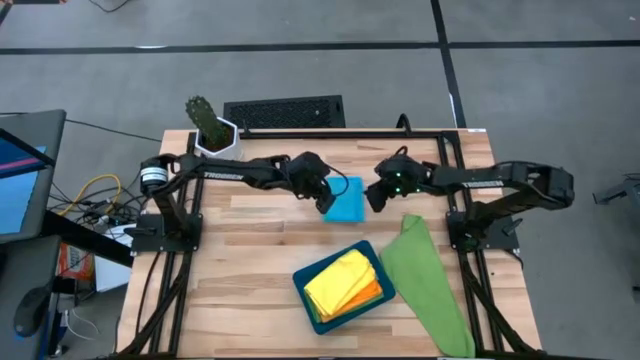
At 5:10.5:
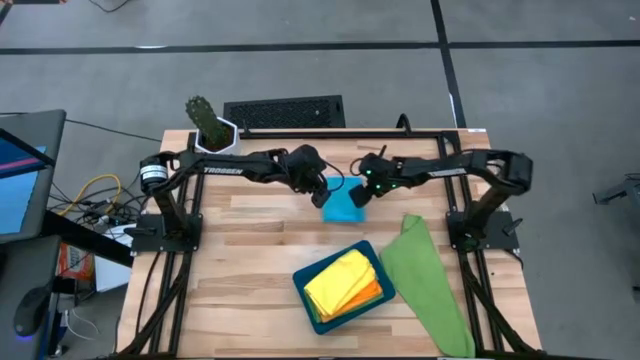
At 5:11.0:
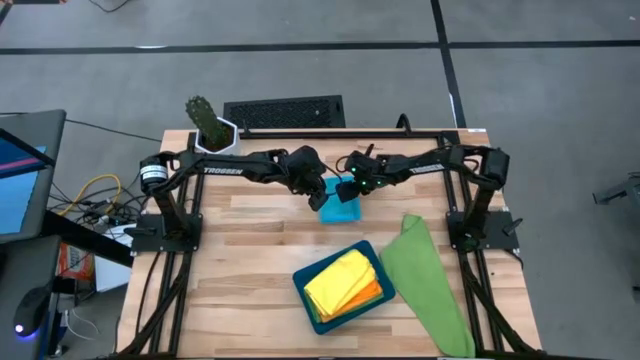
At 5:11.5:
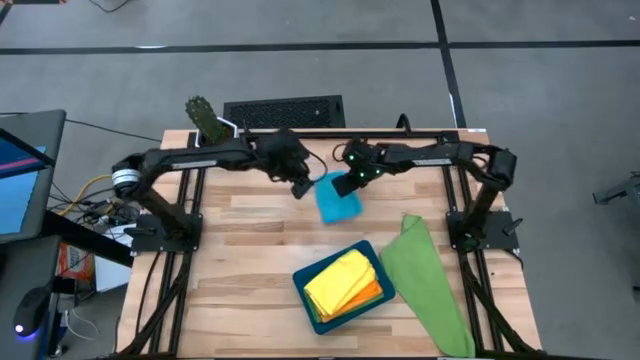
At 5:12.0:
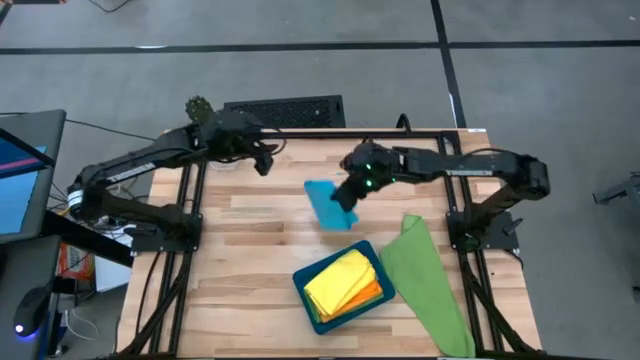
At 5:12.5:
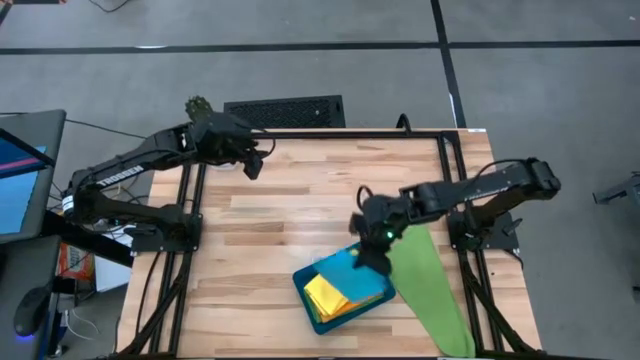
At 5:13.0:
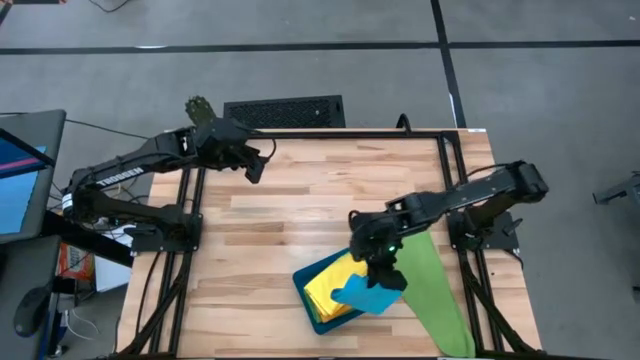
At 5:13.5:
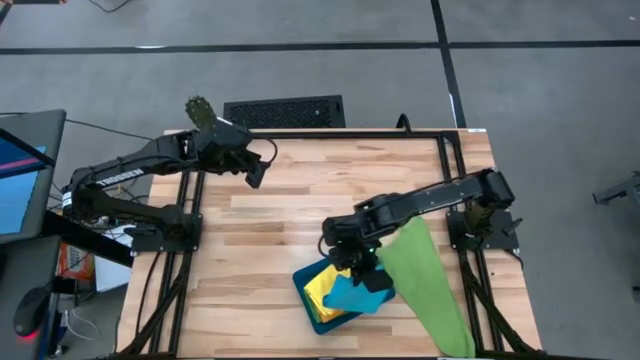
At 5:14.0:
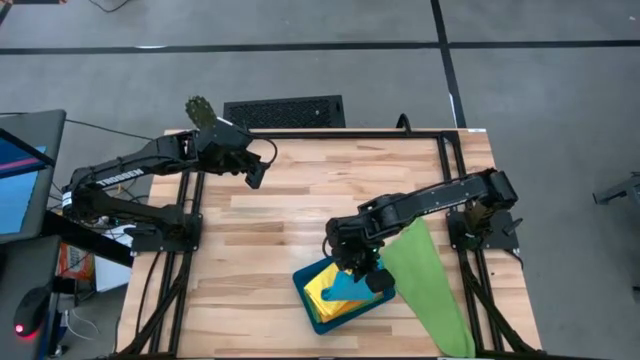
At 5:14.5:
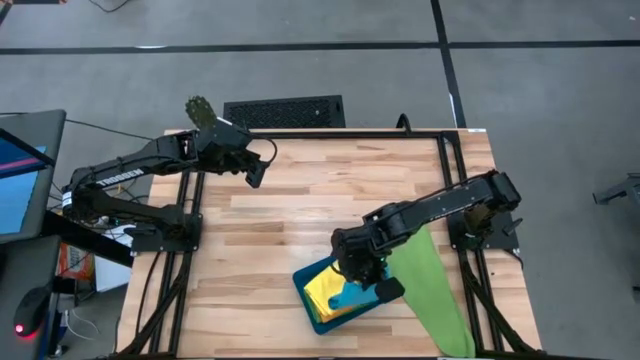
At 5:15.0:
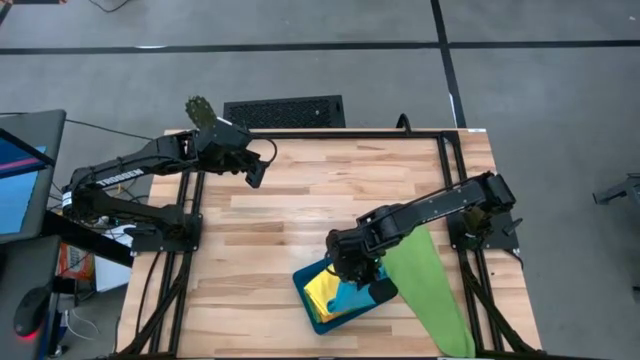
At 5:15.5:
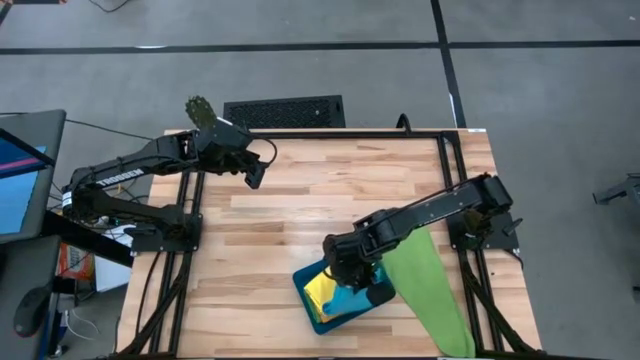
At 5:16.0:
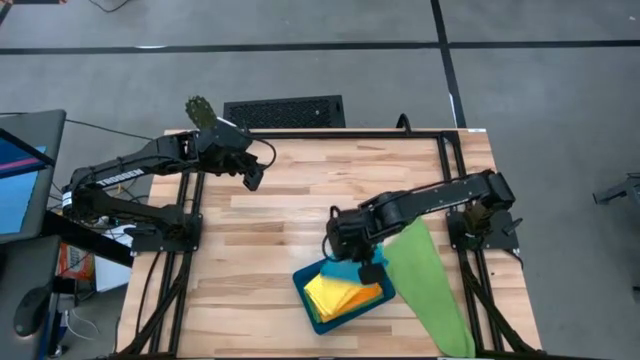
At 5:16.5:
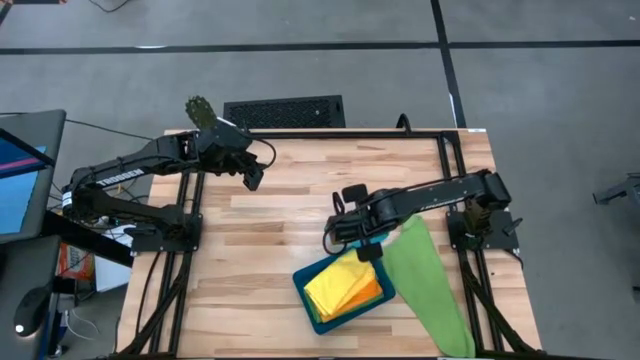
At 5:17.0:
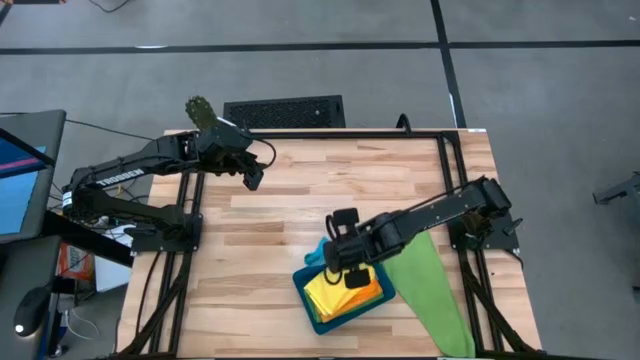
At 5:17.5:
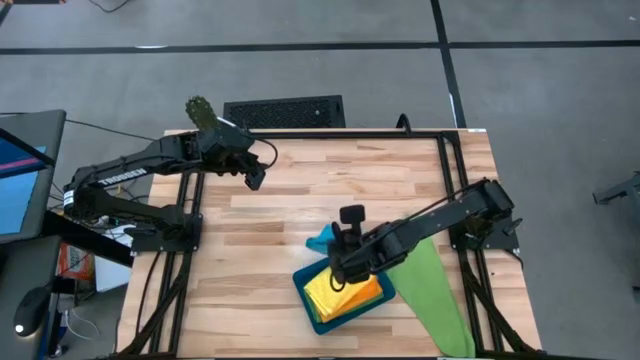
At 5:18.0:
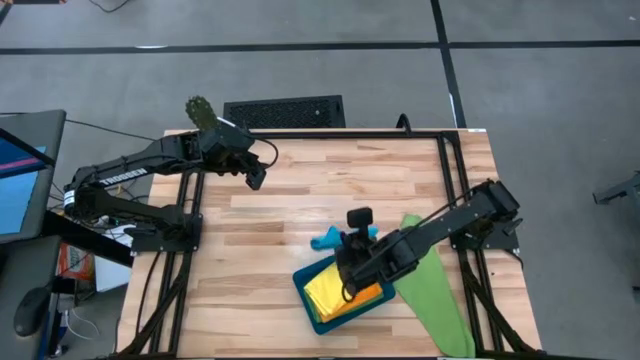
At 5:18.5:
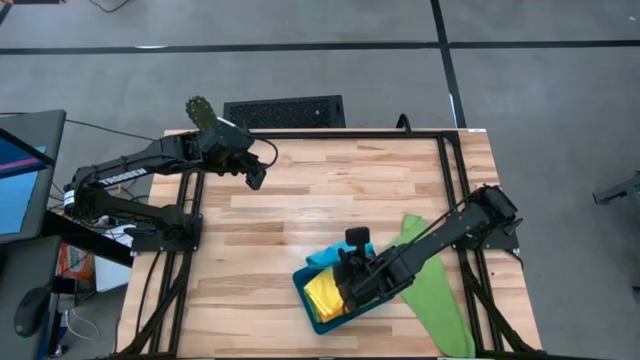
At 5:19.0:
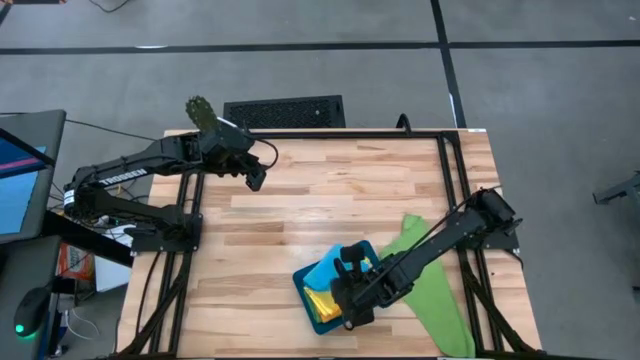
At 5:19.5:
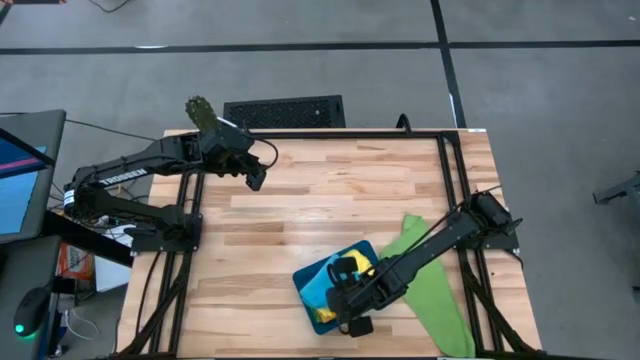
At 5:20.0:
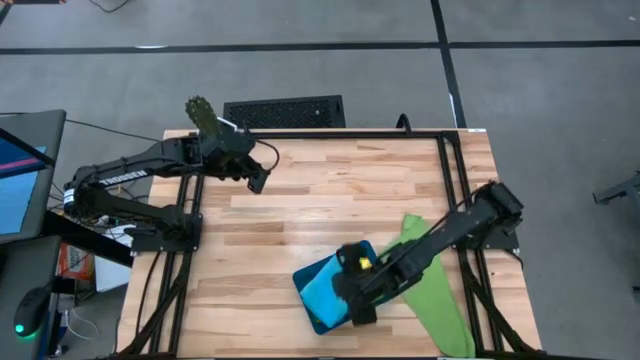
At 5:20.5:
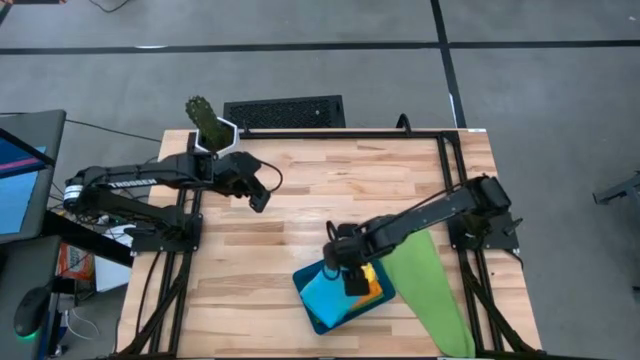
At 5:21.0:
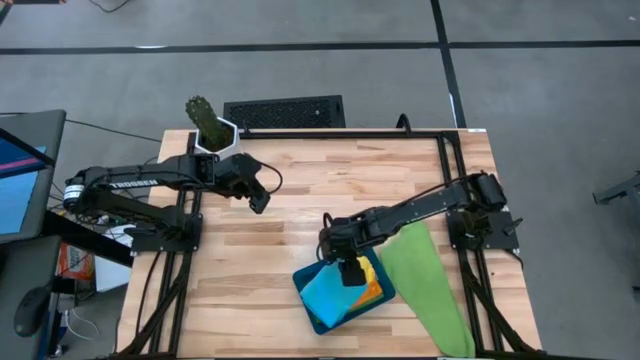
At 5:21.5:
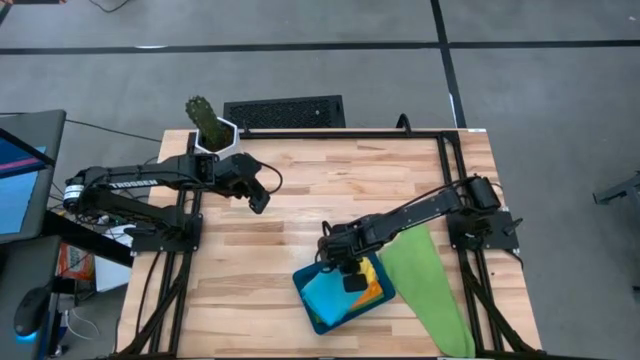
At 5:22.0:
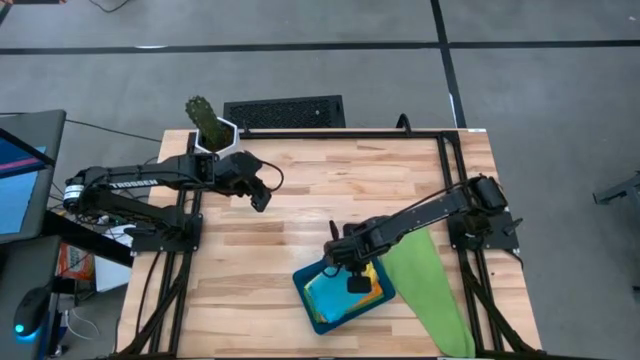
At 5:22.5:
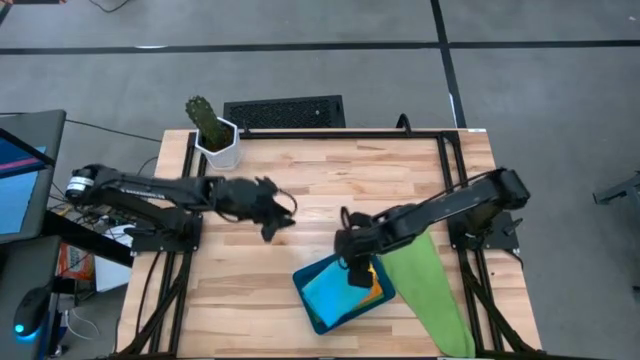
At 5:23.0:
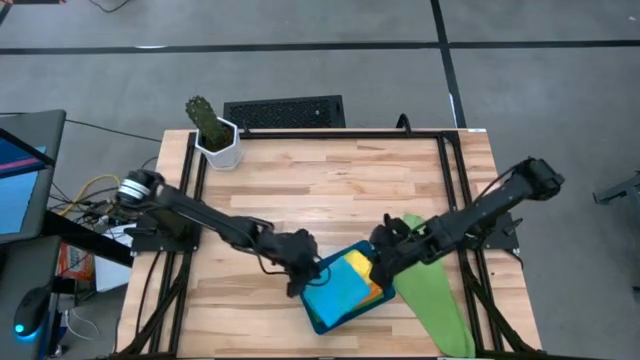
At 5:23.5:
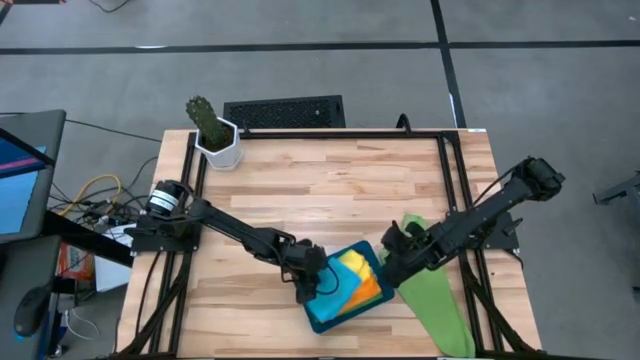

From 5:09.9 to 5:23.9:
Task: Fold microfiber towels
Put the folded blue microfiber towel into the blue bin

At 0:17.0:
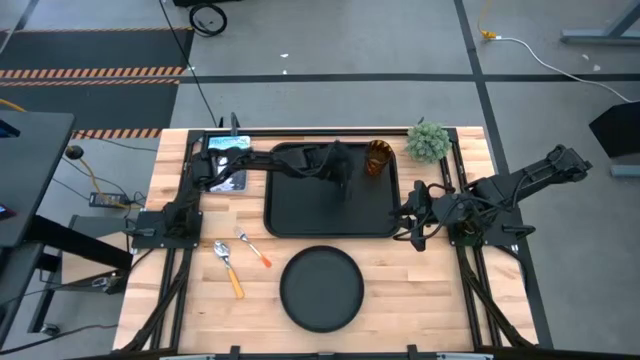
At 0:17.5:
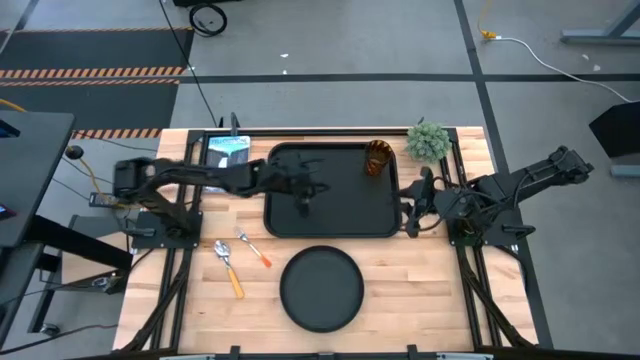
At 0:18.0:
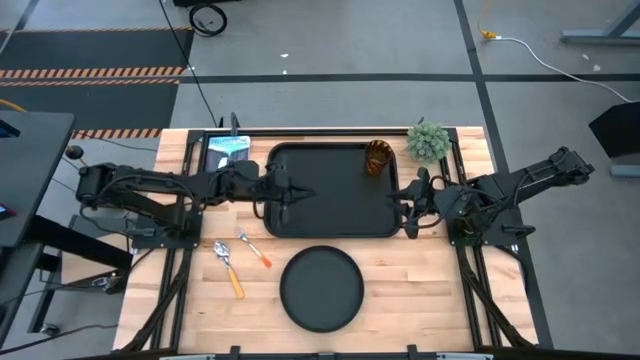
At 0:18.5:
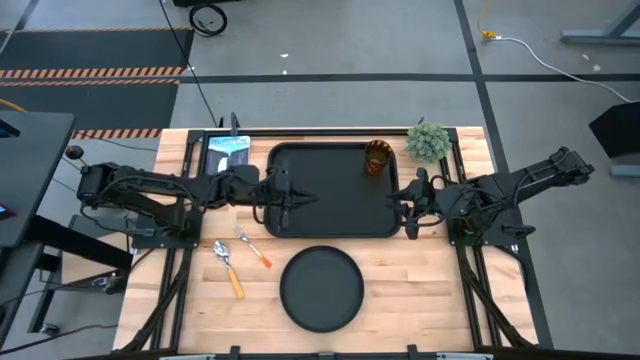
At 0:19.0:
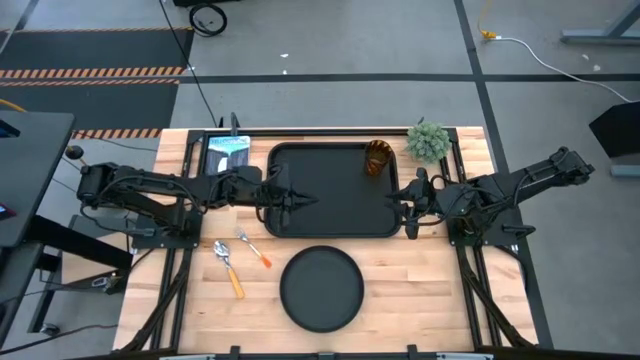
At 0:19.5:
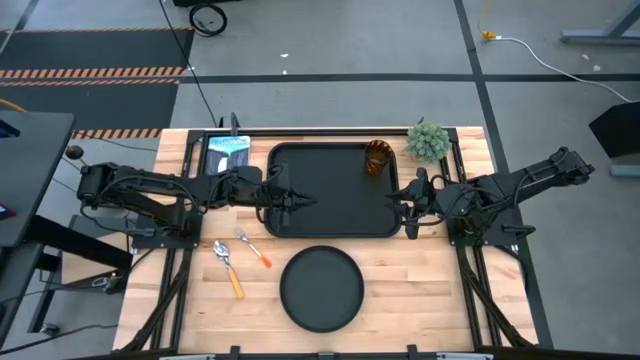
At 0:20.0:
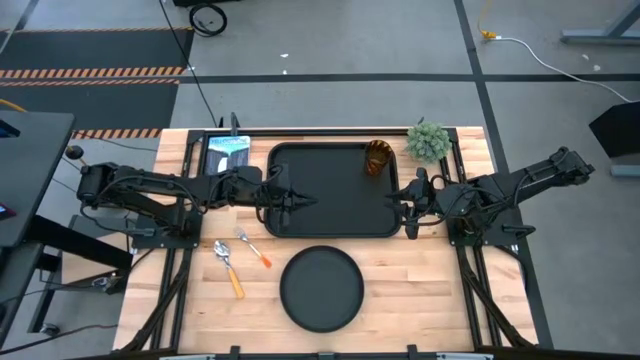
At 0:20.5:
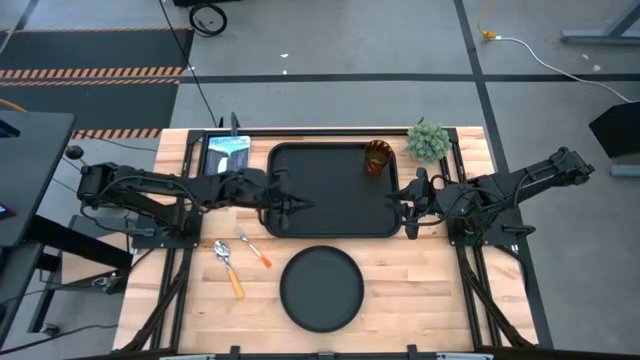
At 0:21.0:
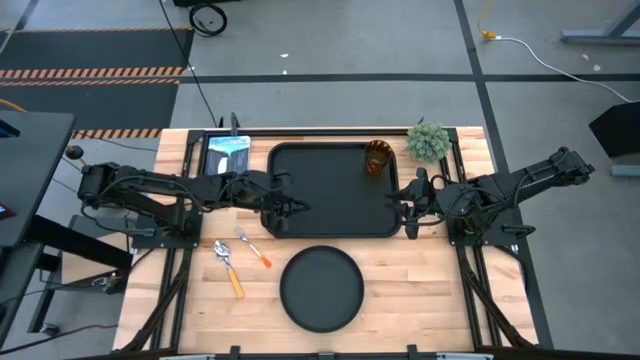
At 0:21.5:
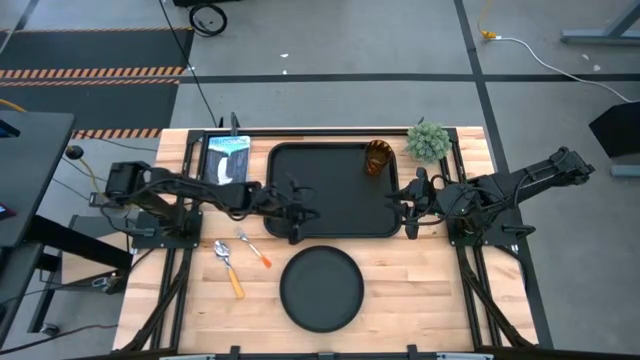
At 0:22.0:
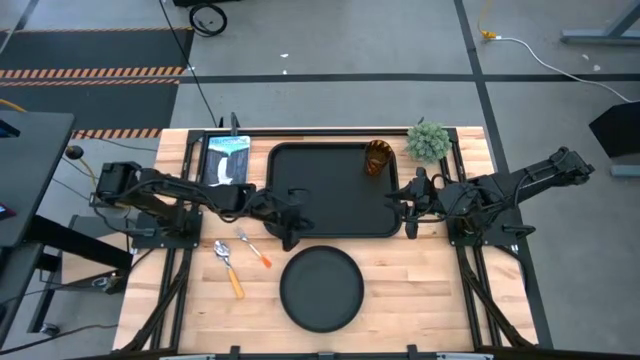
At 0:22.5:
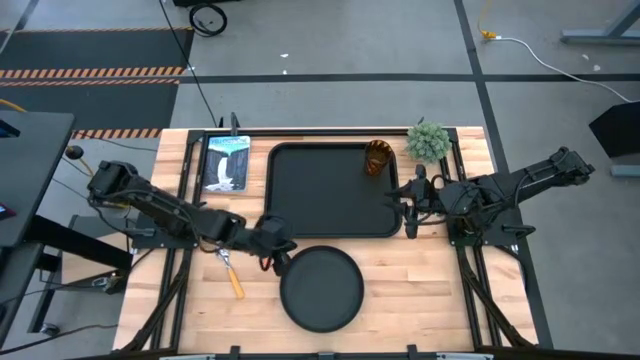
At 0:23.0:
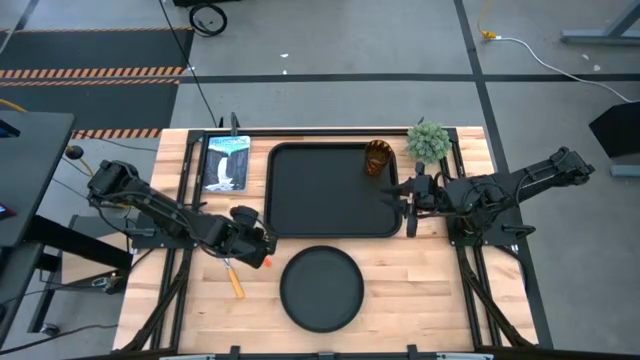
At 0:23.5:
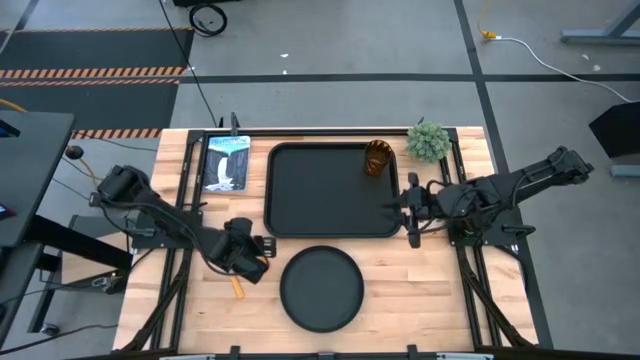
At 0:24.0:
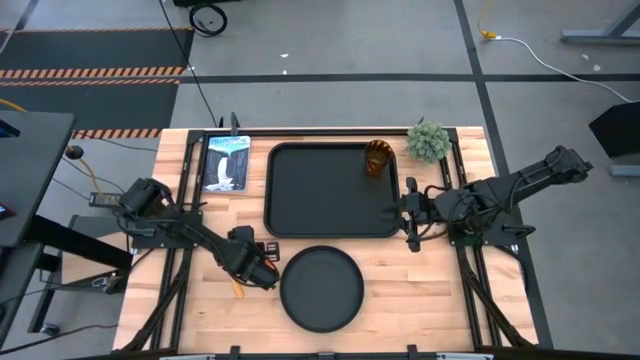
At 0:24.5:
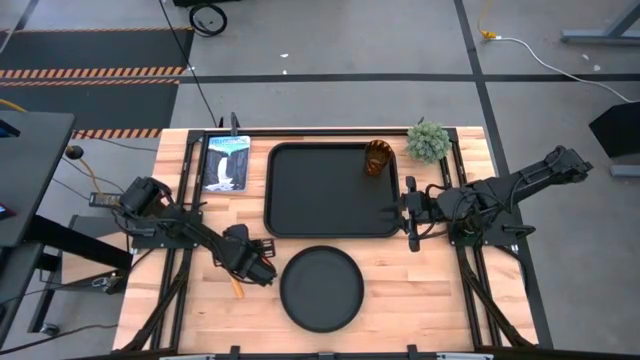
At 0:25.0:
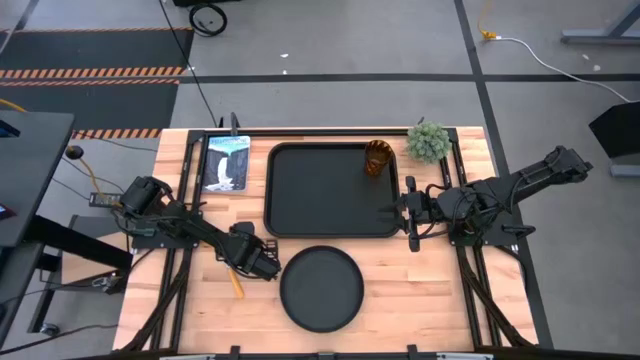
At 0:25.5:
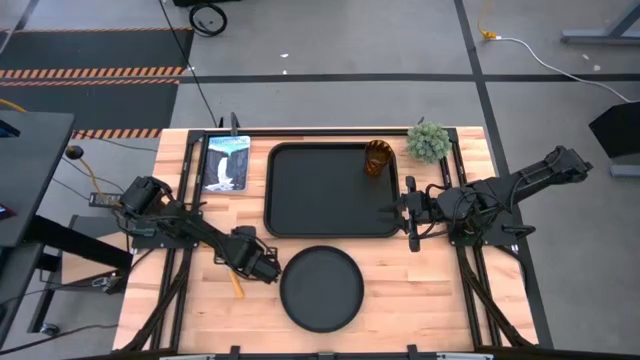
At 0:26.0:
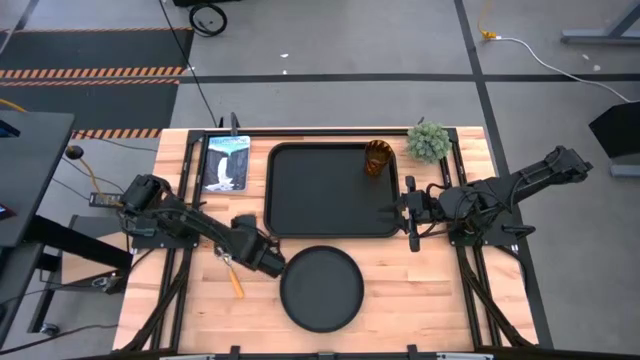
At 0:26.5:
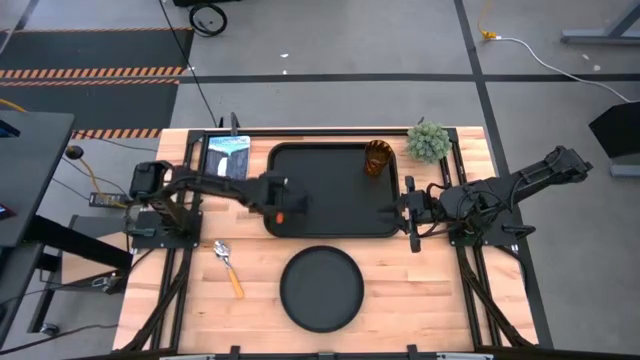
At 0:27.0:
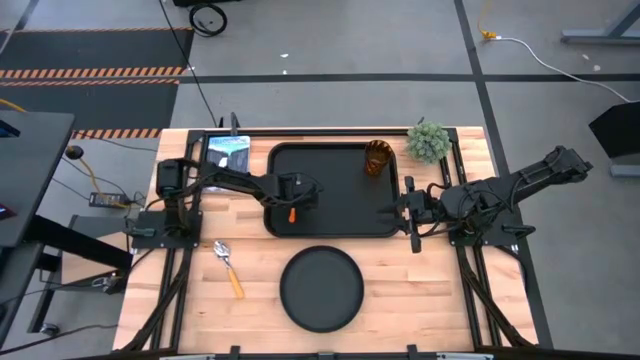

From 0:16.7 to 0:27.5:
Task: Pick and place plate/cup/fork/spoon on tray
Put the orange fork in the left corner of the black tray
